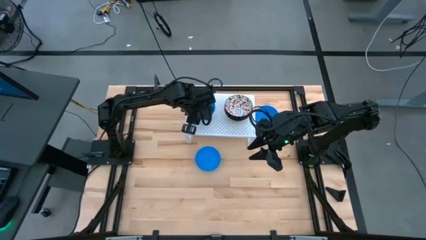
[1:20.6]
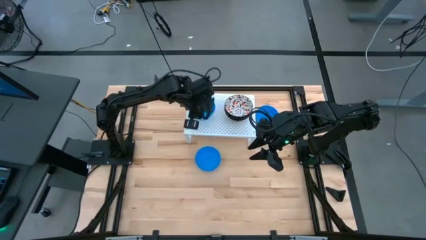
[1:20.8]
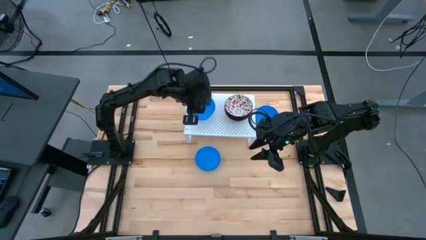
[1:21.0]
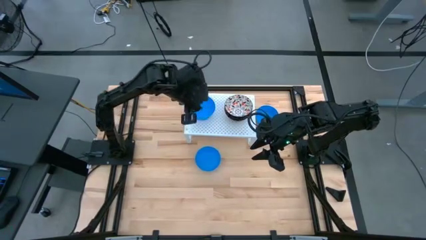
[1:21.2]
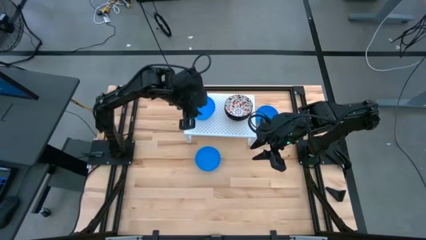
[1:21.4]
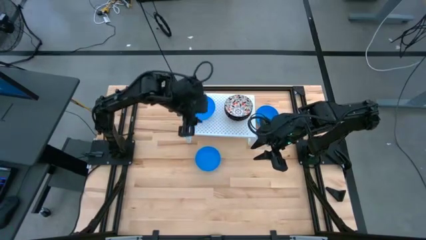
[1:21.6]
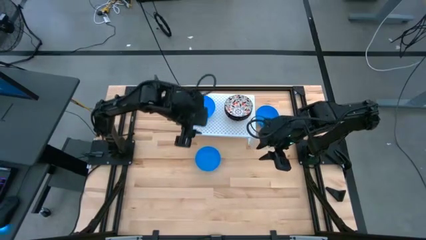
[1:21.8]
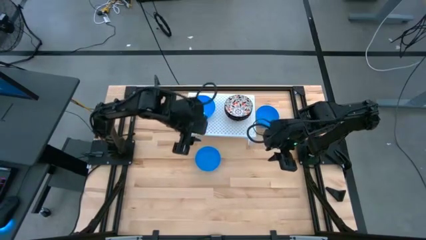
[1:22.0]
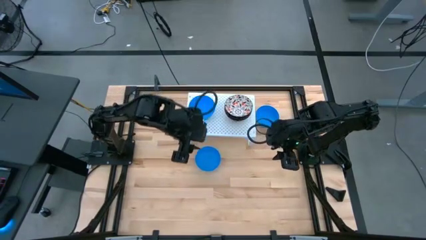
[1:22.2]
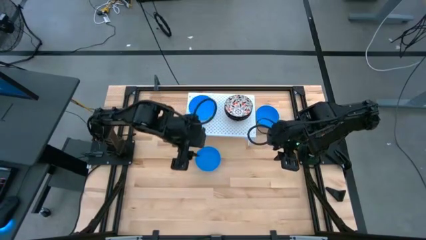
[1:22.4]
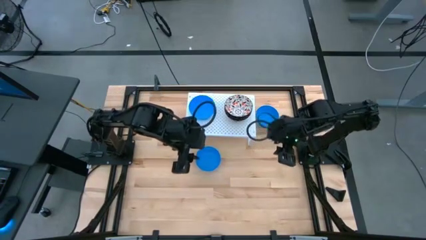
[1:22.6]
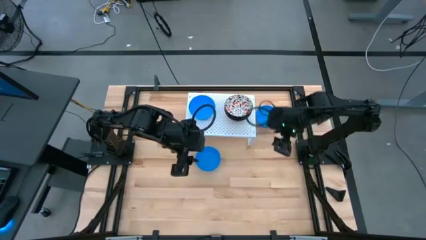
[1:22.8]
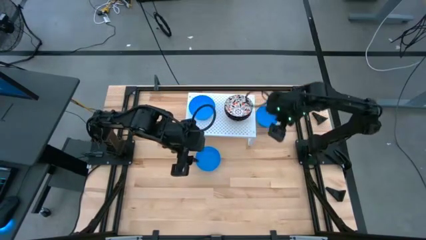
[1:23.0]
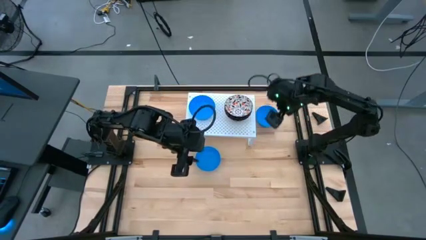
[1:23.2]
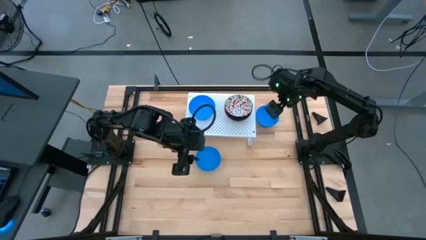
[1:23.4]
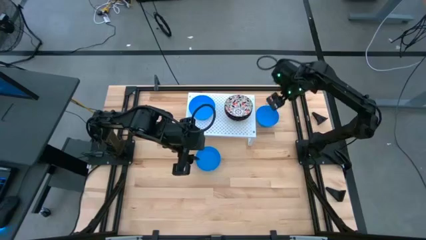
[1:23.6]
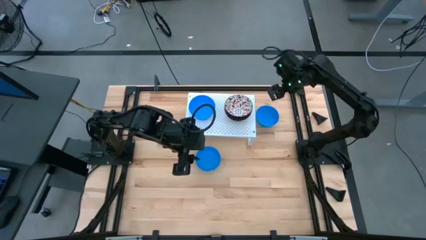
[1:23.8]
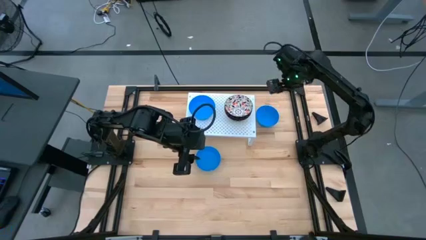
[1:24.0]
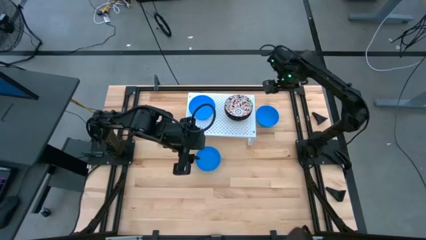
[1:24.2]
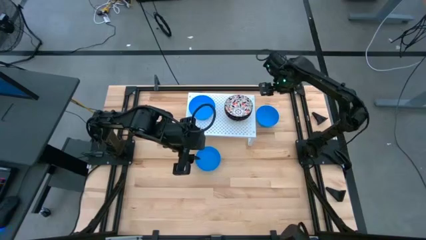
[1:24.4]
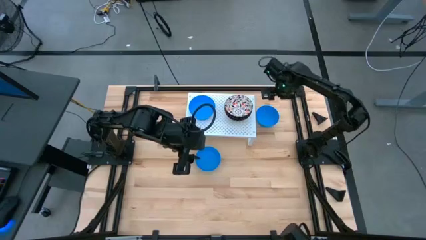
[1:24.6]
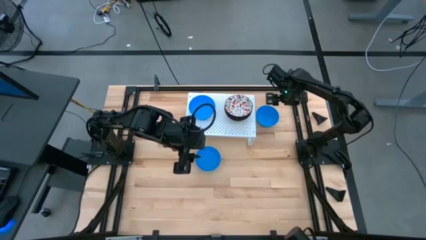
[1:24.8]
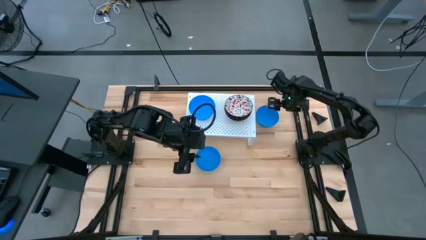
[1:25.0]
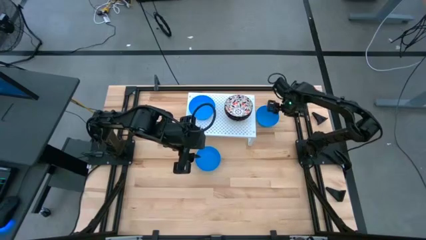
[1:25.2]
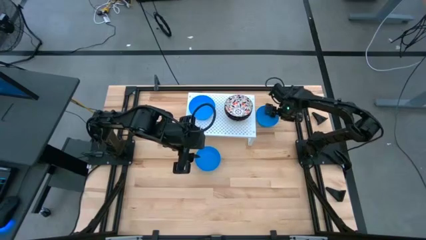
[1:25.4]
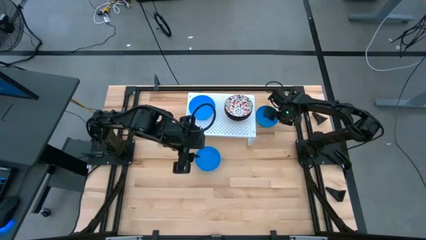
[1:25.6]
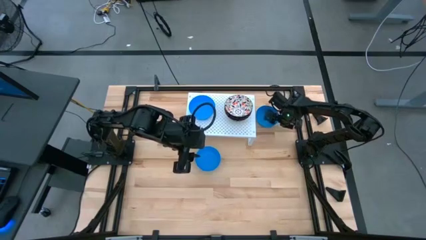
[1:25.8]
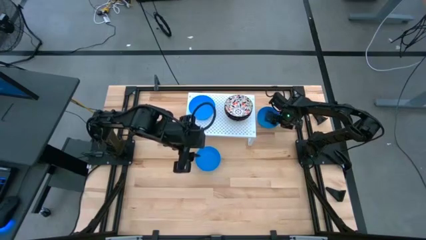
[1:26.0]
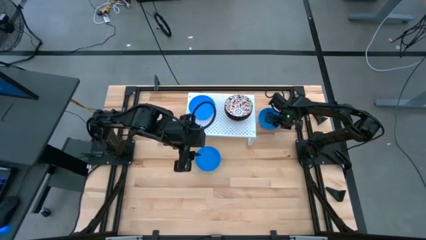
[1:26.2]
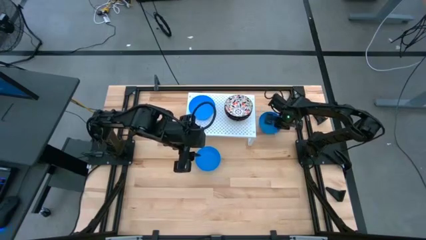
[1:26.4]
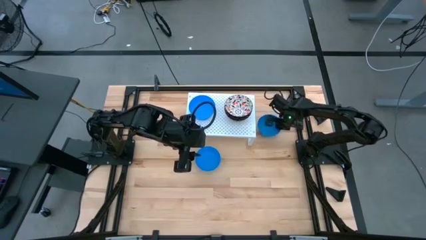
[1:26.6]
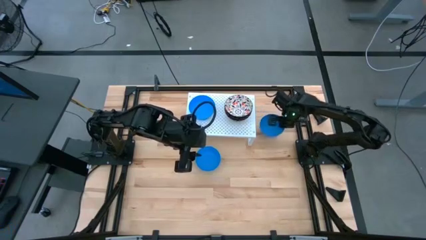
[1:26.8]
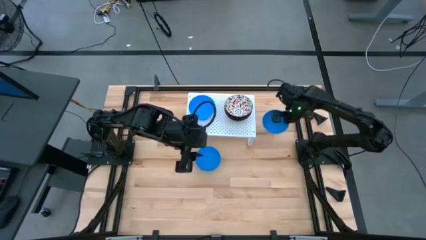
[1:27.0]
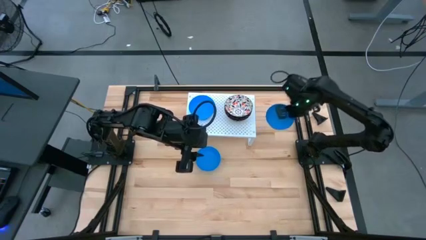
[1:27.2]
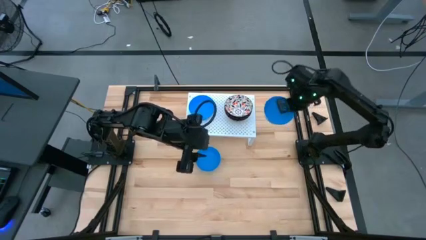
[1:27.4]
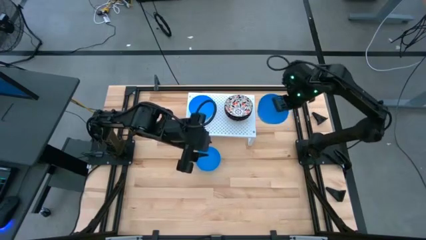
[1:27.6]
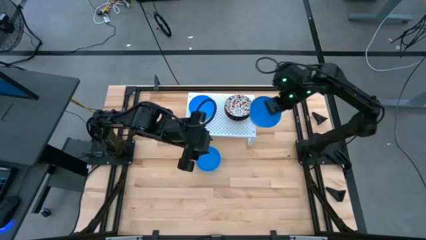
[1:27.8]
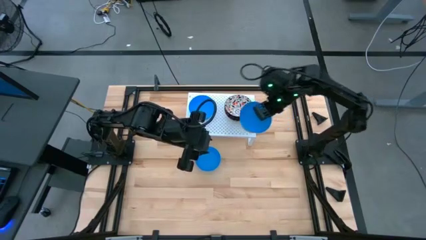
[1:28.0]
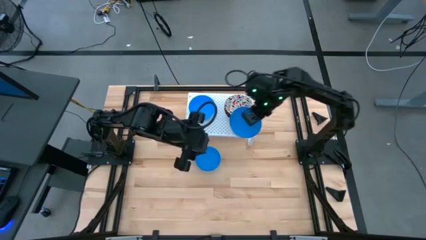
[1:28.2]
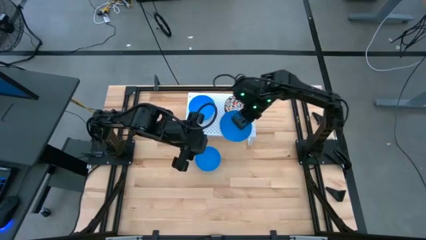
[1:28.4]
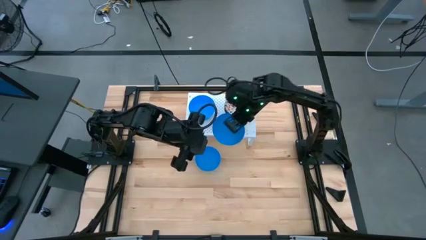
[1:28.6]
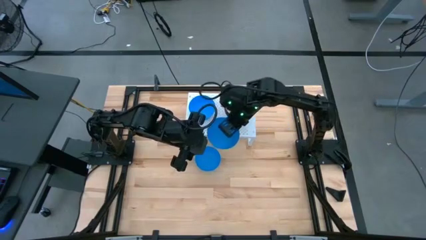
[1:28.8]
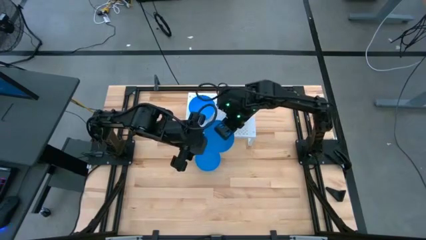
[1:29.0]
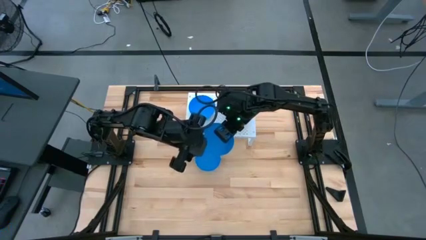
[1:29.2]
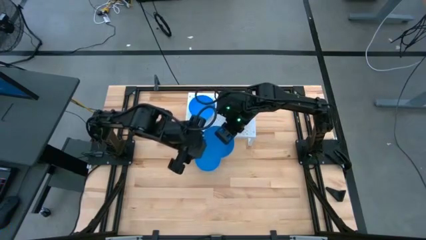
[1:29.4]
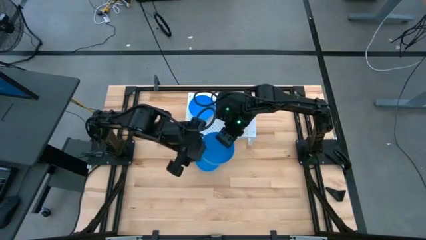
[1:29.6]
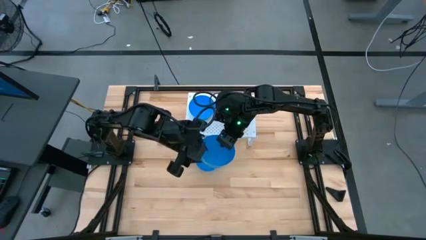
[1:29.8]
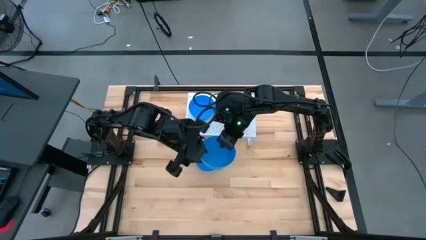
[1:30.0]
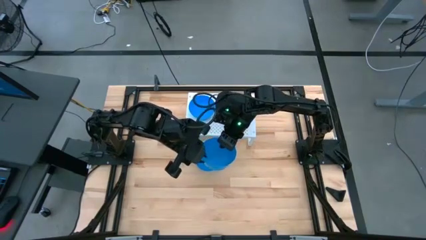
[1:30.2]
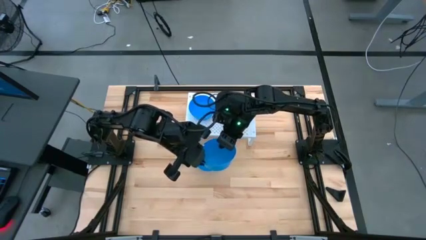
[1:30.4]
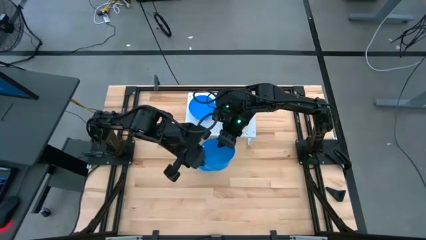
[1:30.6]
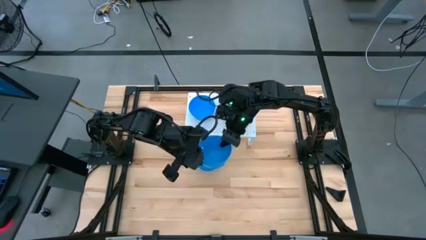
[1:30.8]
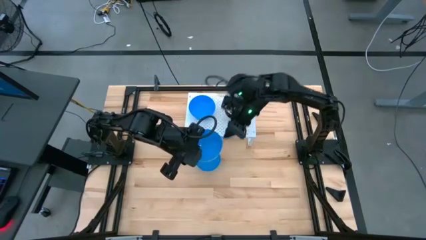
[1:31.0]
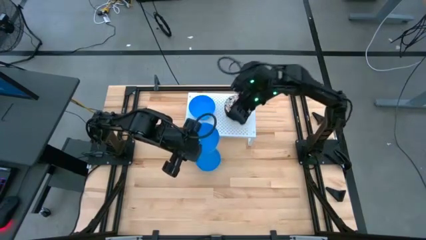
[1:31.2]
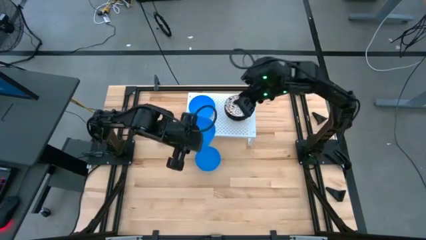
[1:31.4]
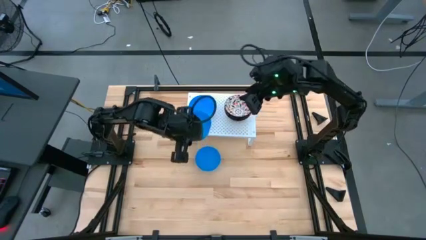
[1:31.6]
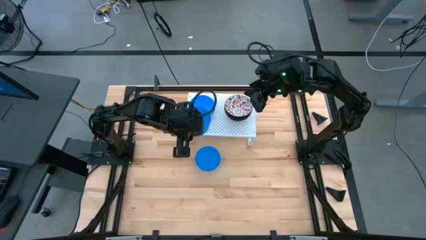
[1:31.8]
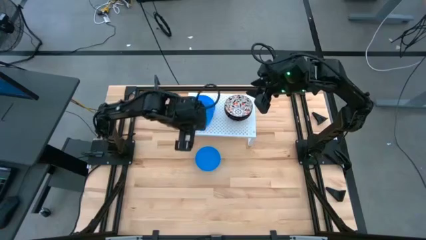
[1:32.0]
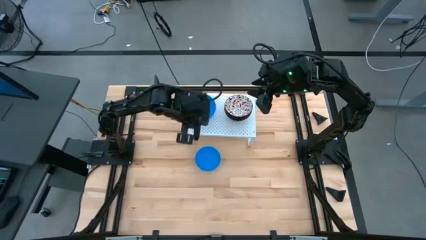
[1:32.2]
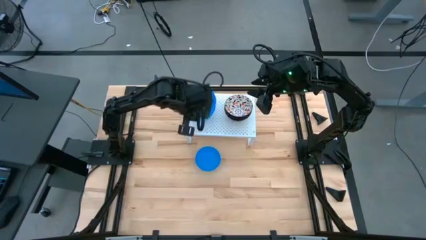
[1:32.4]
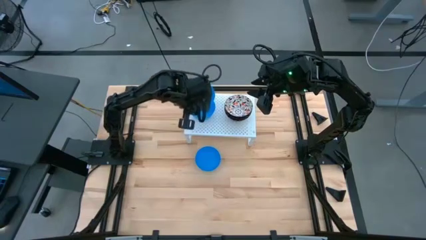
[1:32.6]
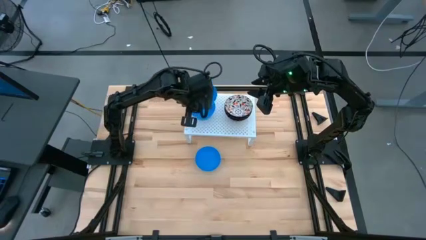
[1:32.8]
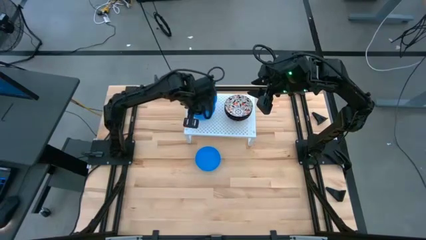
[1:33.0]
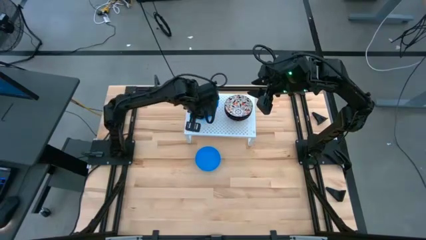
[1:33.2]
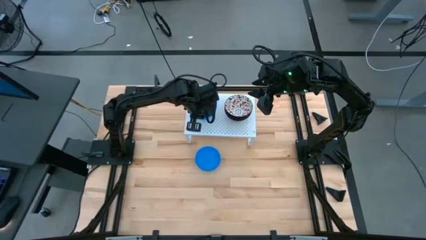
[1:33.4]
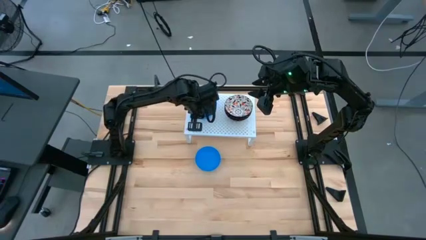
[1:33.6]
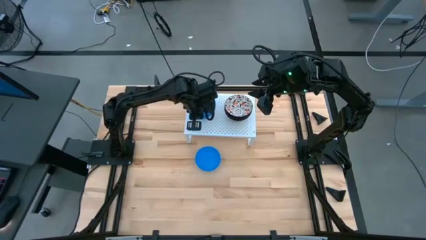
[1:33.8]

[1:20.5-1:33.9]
Task: Pick & Place Mini bowls
Stack the right blue bowl on top of the other blue bowl on the shelf

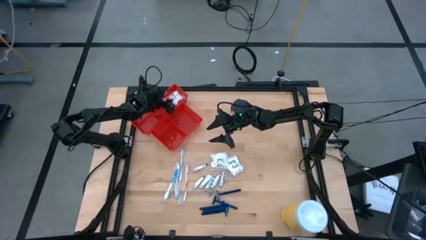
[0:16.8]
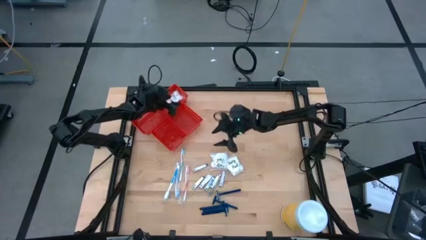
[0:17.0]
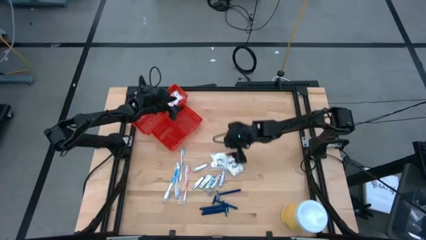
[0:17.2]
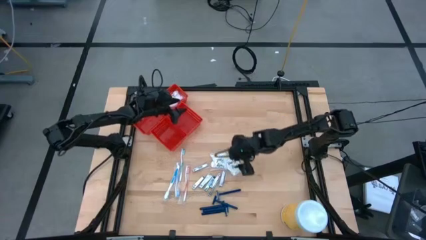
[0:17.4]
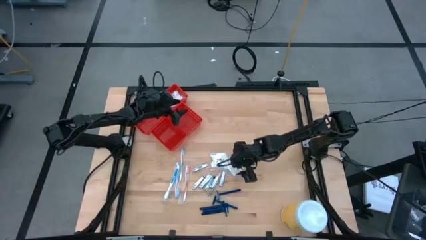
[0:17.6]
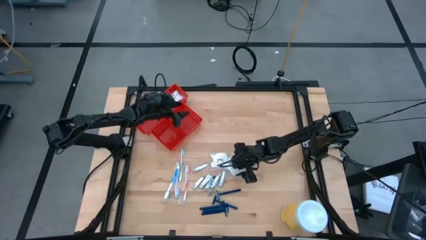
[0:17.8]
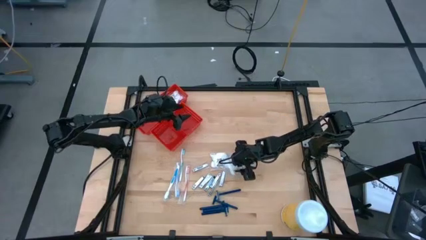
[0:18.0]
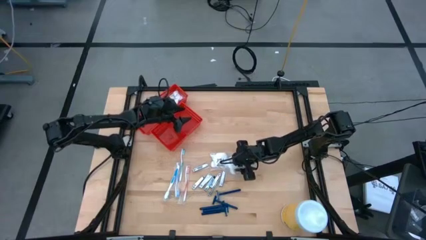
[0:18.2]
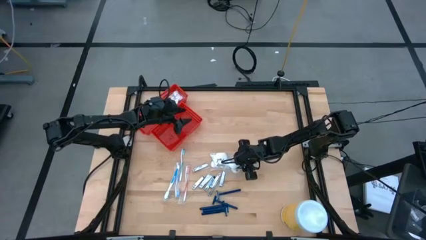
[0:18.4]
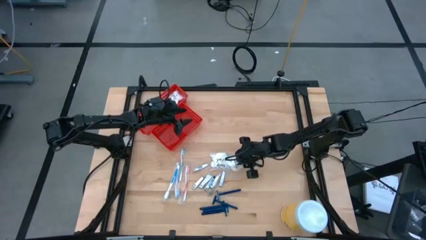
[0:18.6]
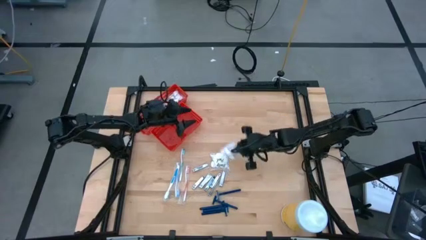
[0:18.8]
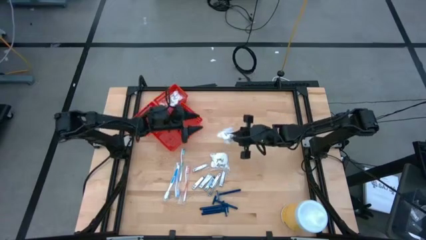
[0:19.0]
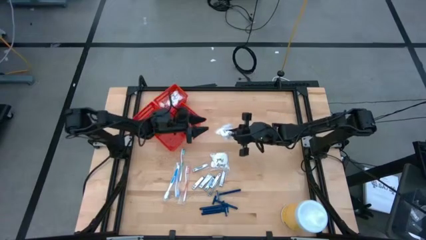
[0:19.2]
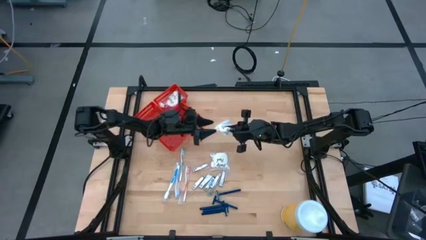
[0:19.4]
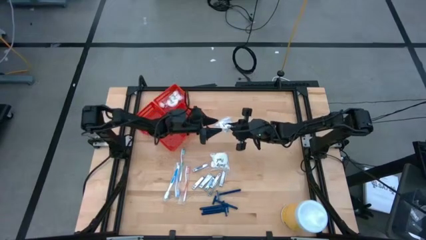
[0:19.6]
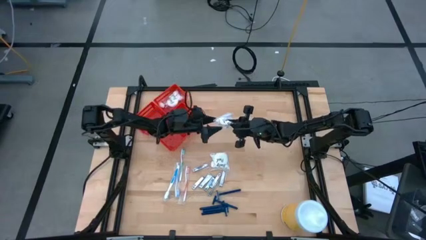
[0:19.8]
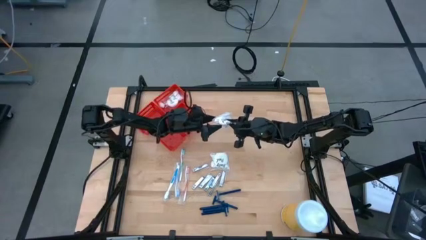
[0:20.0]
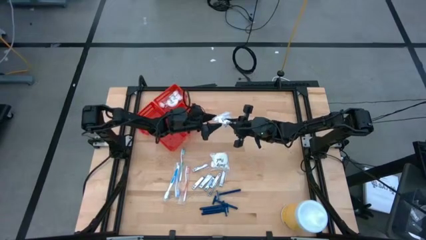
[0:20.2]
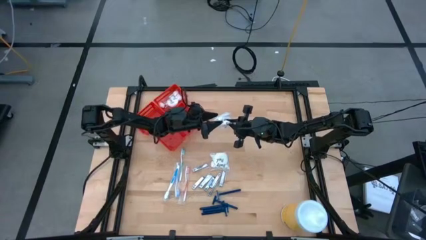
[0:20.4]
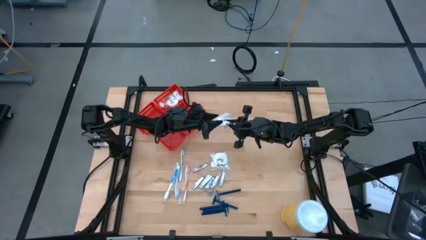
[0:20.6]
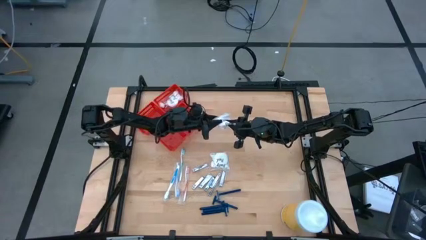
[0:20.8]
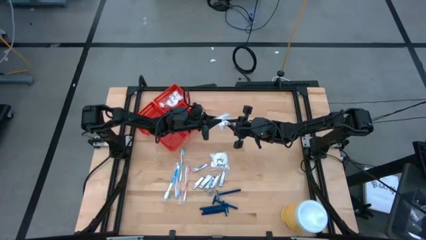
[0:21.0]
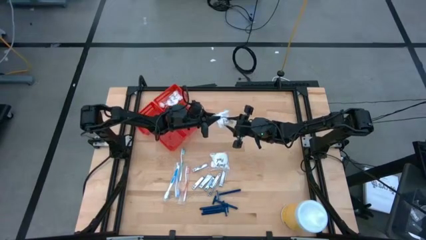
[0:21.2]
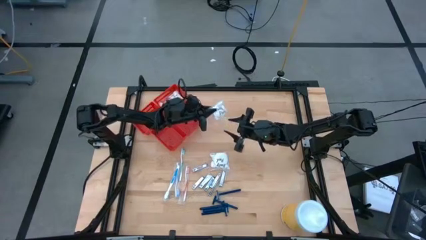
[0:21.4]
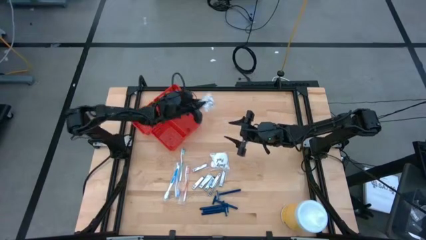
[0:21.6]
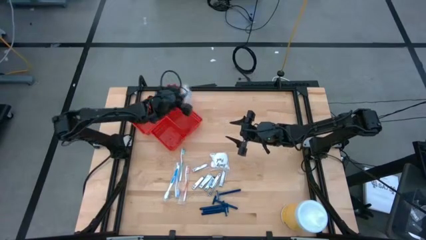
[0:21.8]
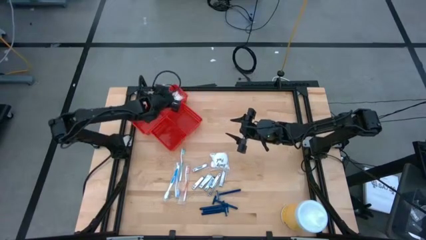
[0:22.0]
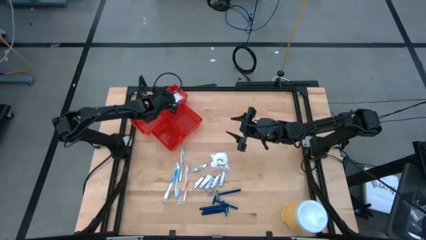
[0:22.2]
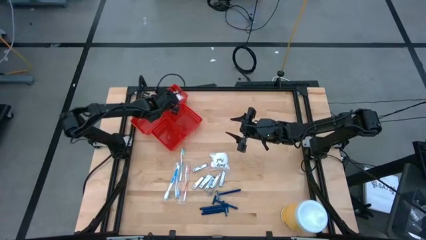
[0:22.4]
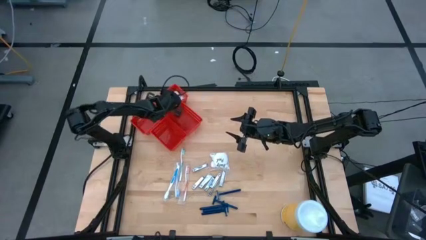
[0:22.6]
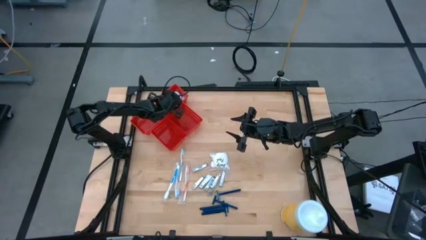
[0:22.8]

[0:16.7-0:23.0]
Task: Pick & Place Travel size toiletries
Put the right vanity pack into the horizontal right red bin
